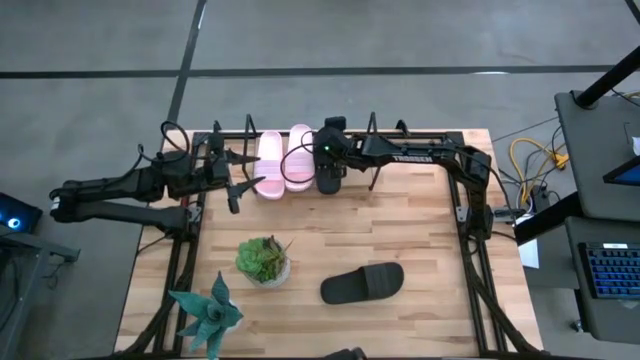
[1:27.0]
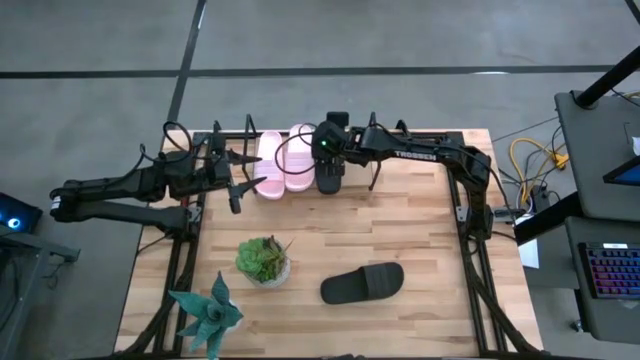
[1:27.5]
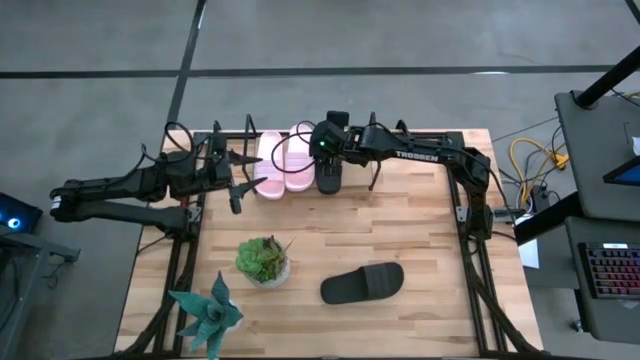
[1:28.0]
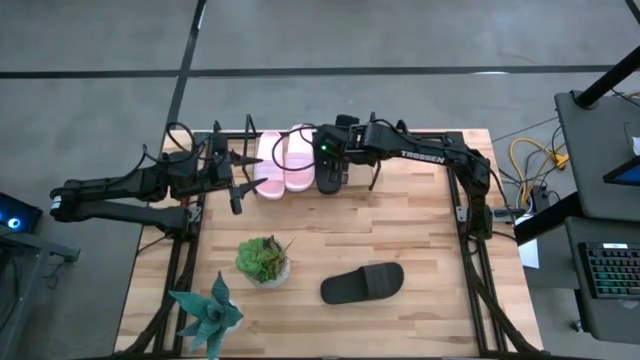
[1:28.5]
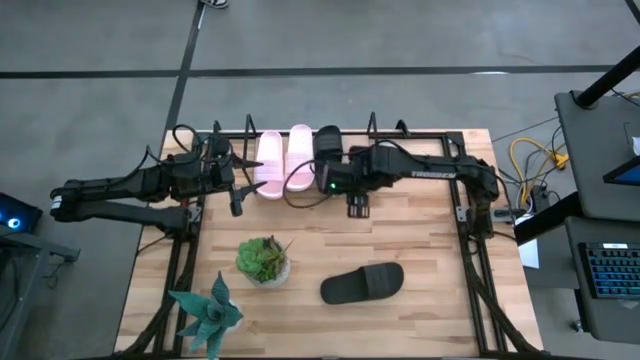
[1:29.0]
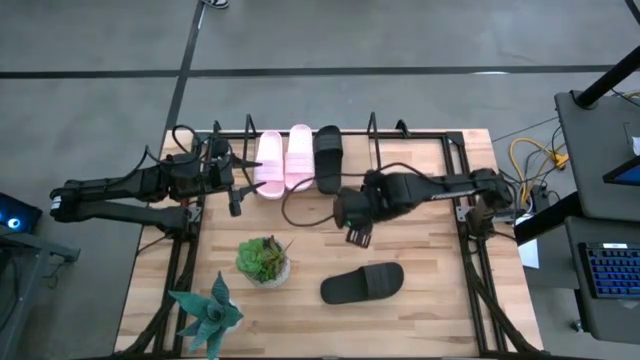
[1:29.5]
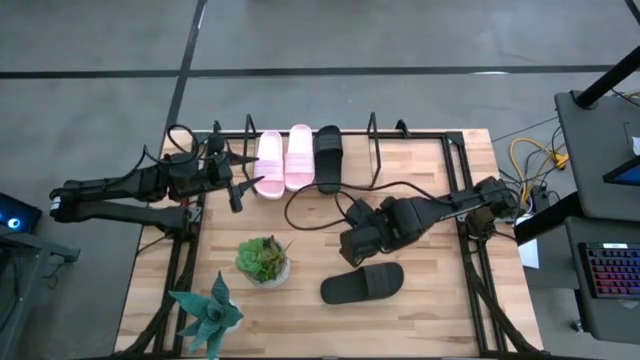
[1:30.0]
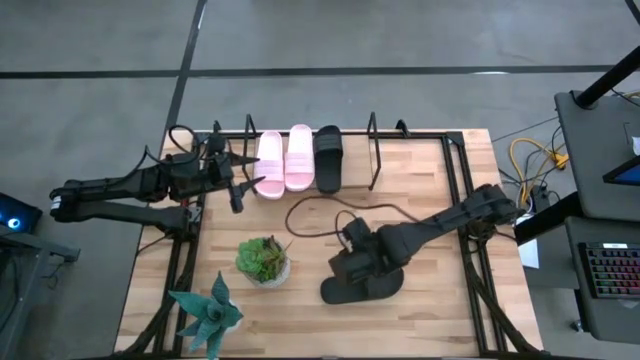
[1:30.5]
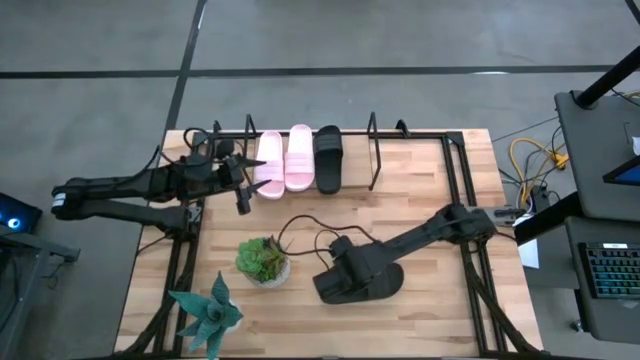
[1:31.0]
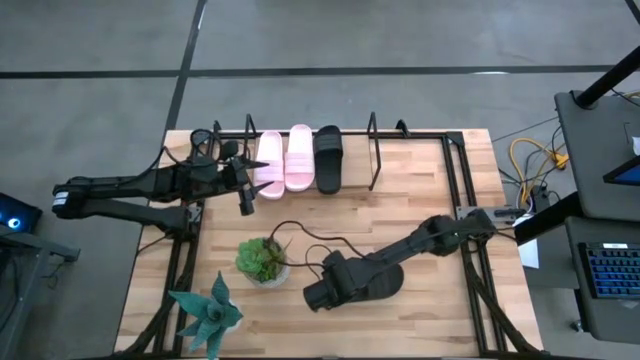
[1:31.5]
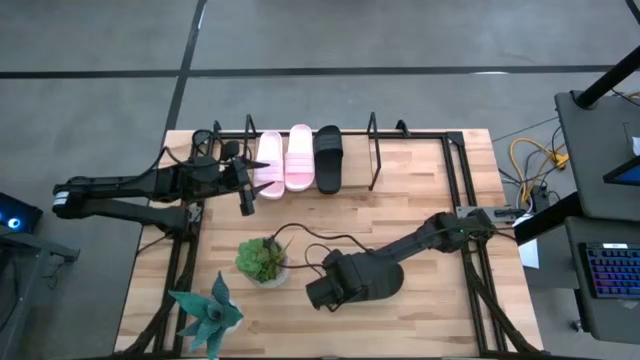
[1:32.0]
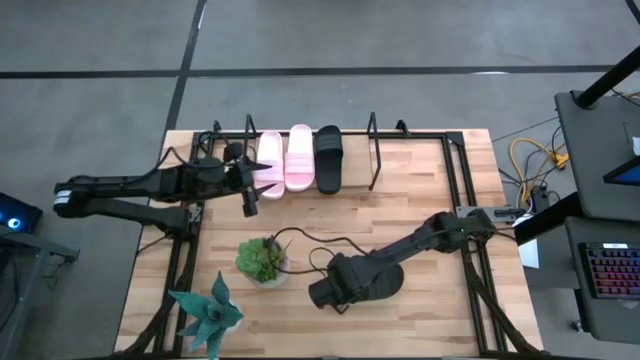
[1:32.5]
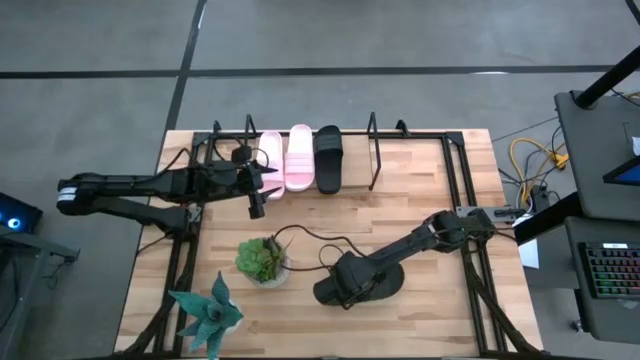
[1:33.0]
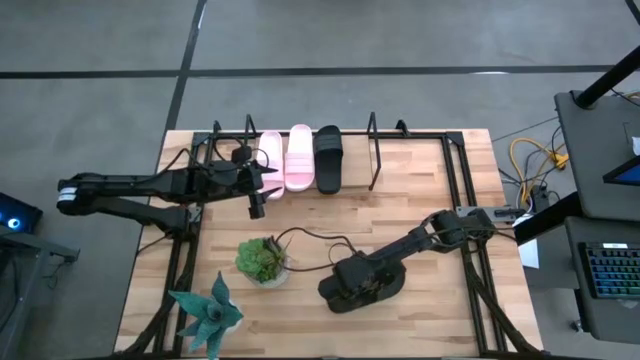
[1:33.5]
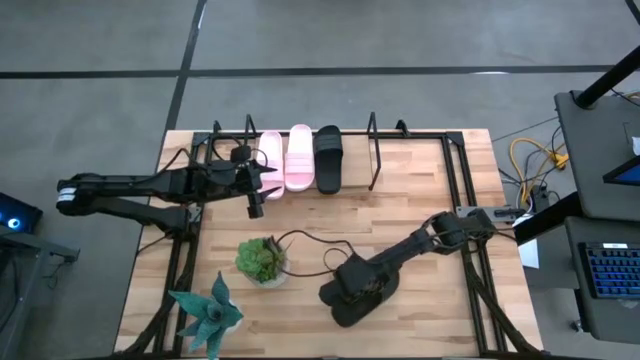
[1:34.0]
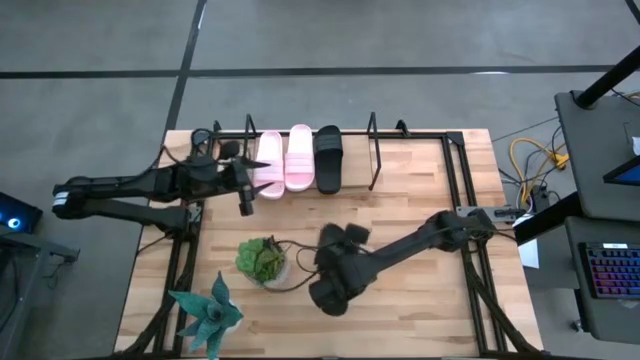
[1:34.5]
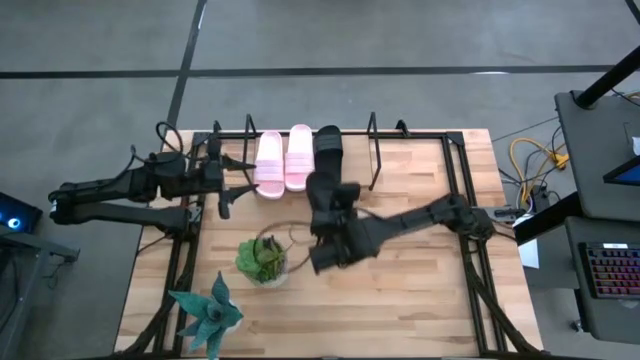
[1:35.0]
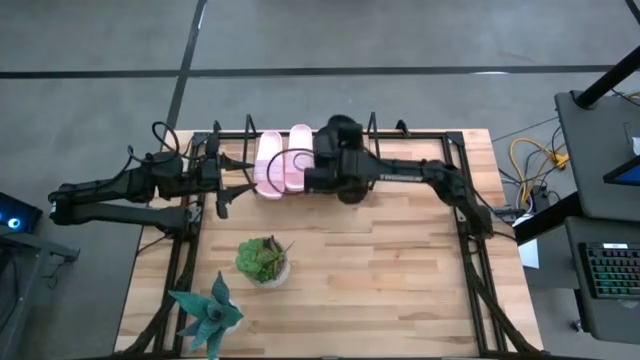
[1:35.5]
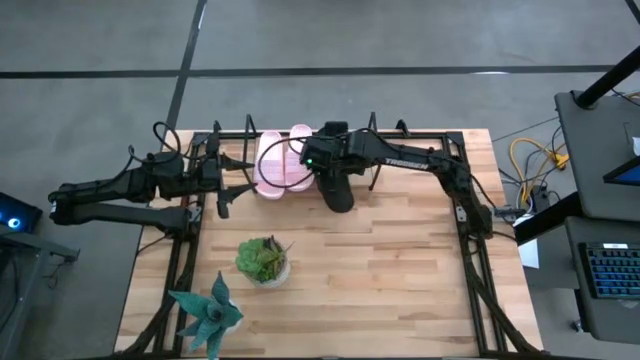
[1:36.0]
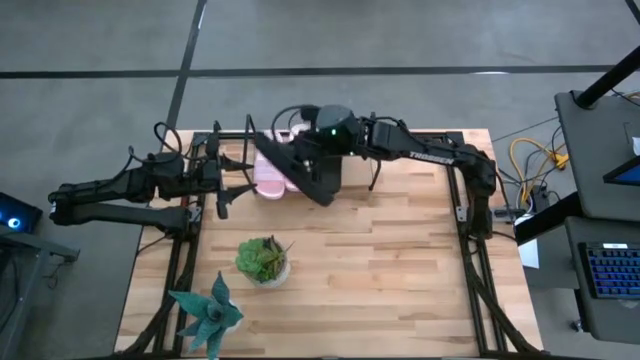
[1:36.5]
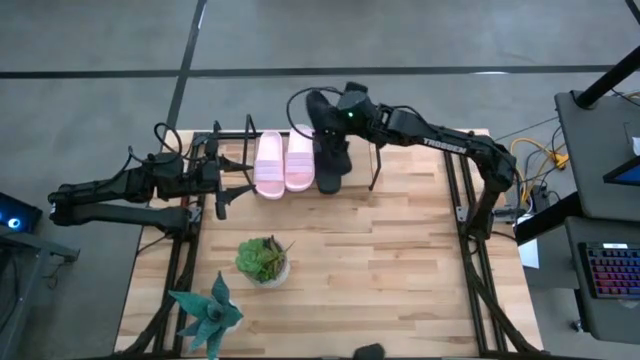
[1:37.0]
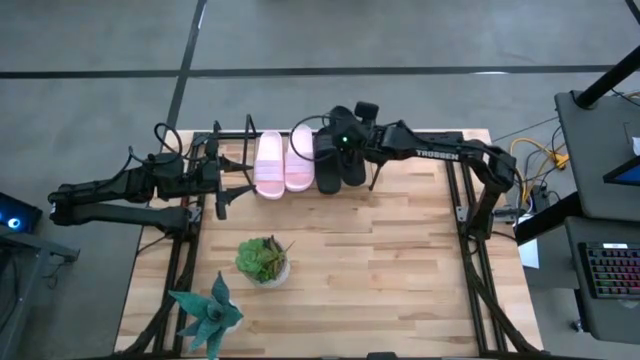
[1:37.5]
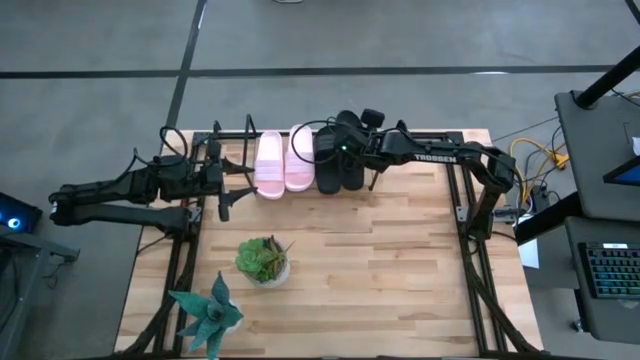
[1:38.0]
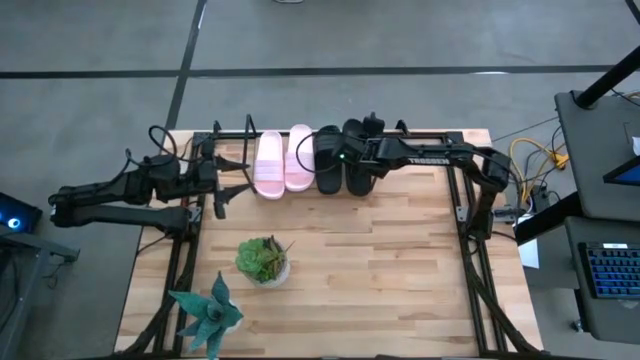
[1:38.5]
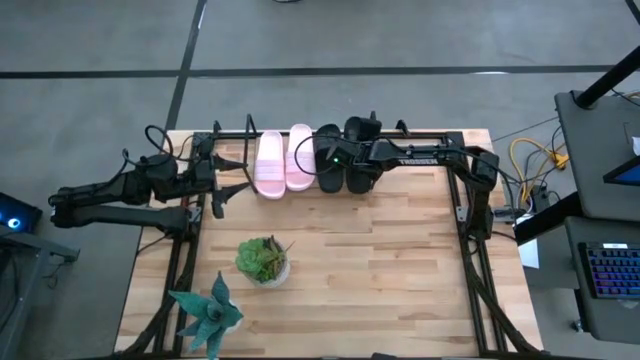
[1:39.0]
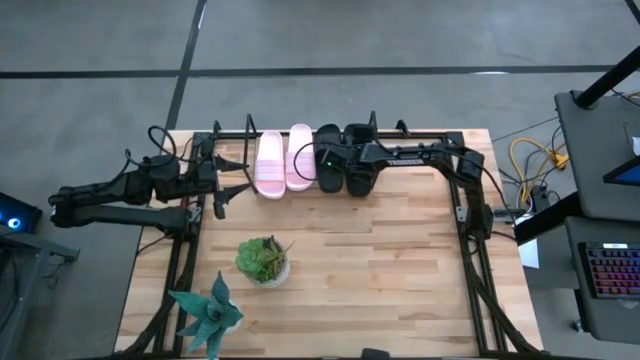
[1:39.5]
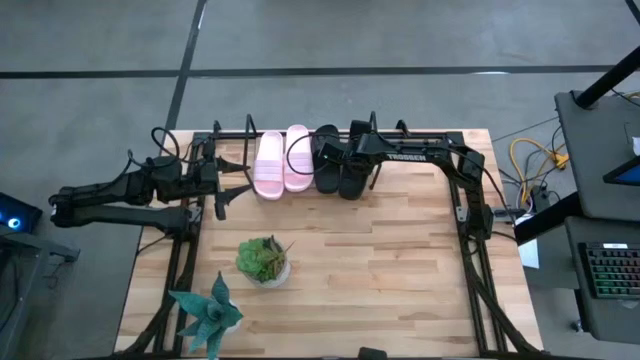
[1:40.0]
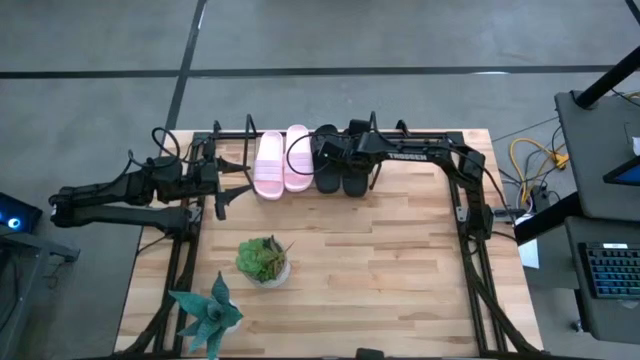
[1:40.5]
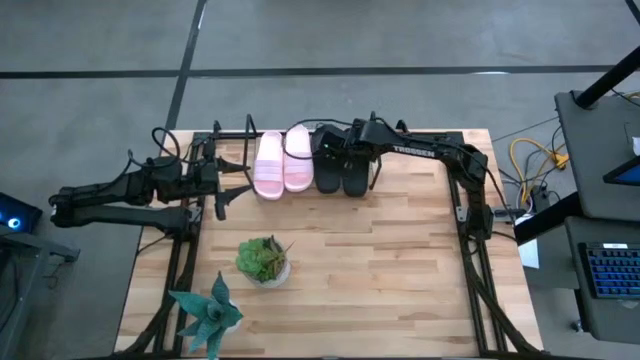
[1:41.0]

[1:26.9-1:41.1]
Task: Pick and place slides into the shelf
Put the bottom black slide on the shelf

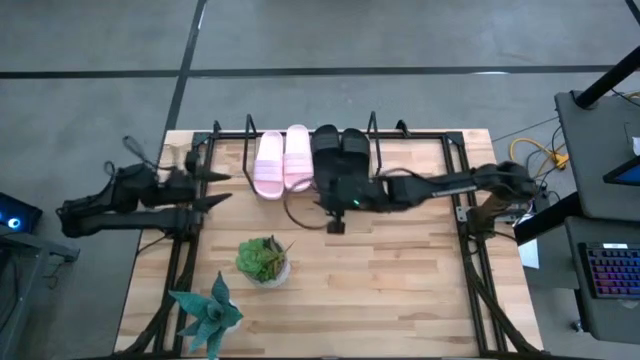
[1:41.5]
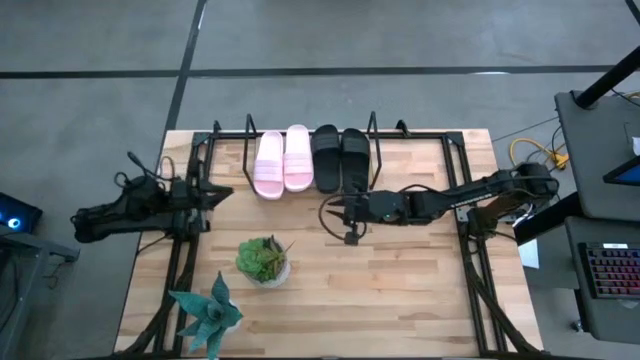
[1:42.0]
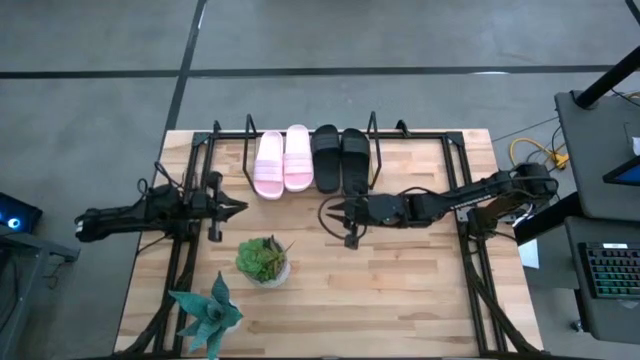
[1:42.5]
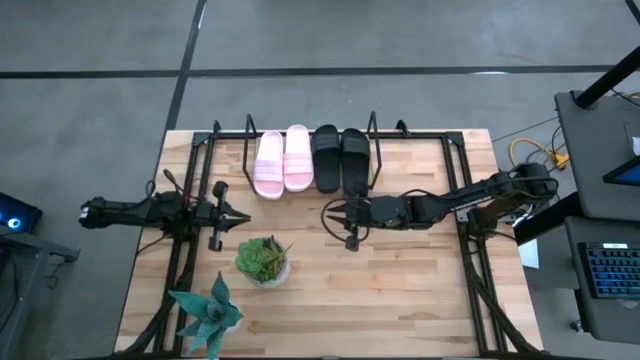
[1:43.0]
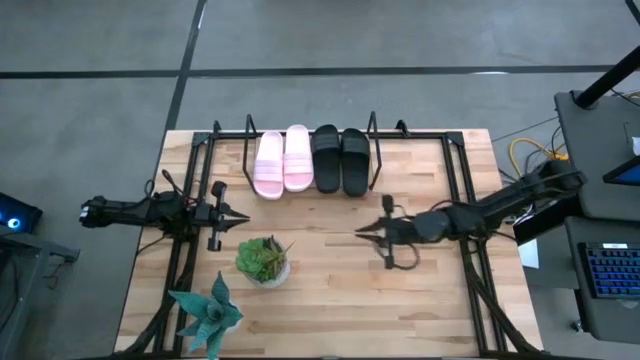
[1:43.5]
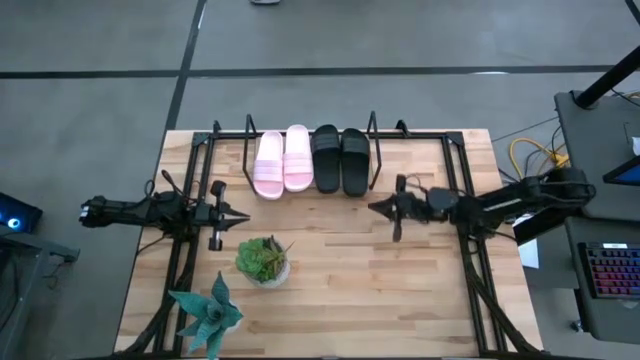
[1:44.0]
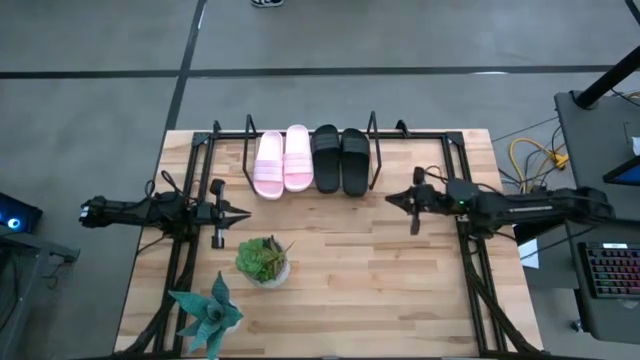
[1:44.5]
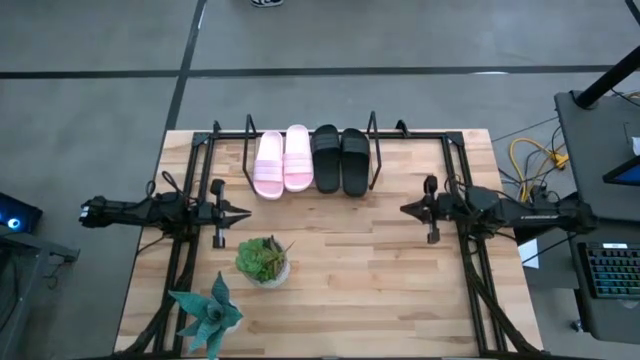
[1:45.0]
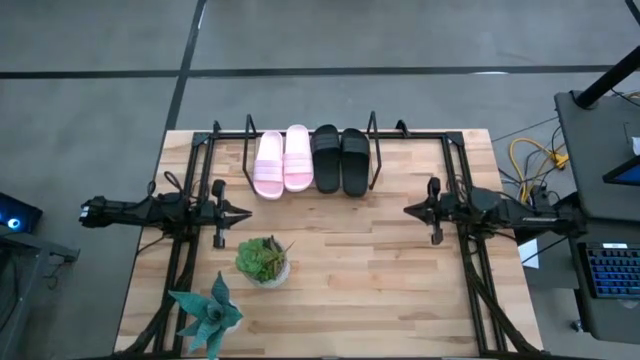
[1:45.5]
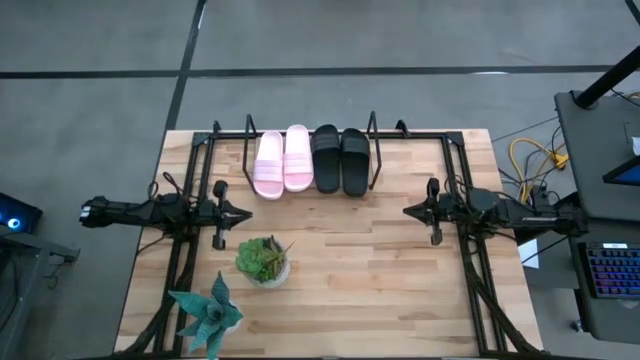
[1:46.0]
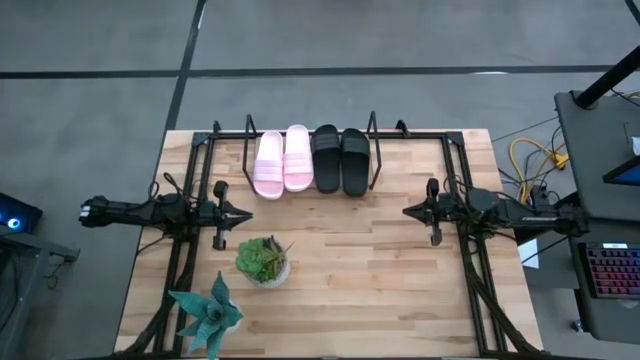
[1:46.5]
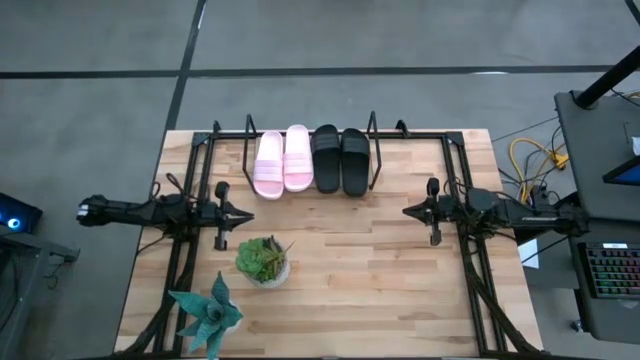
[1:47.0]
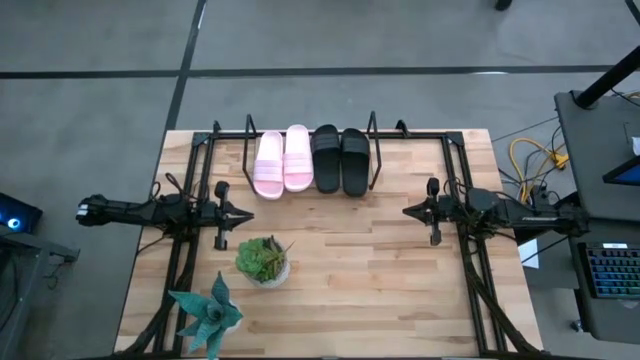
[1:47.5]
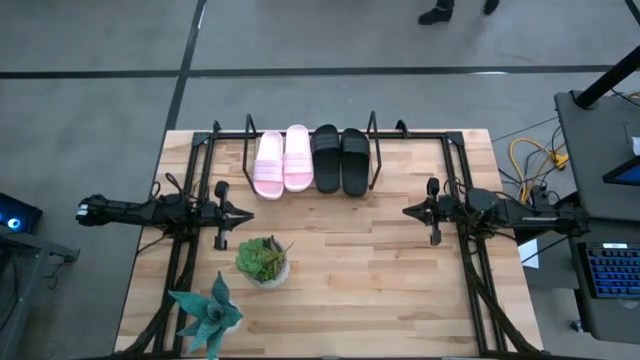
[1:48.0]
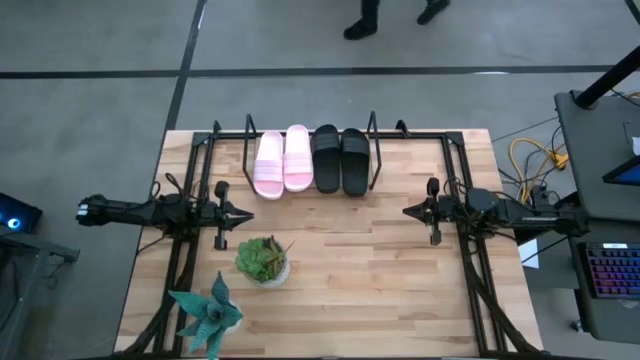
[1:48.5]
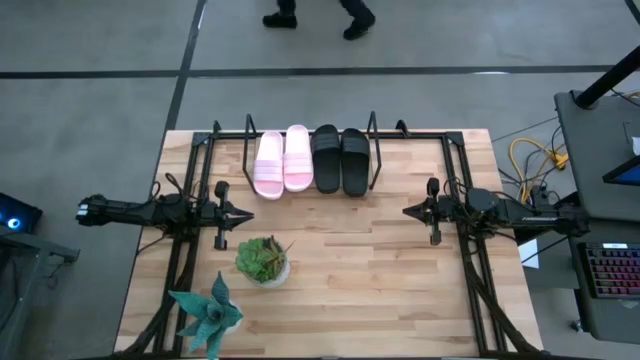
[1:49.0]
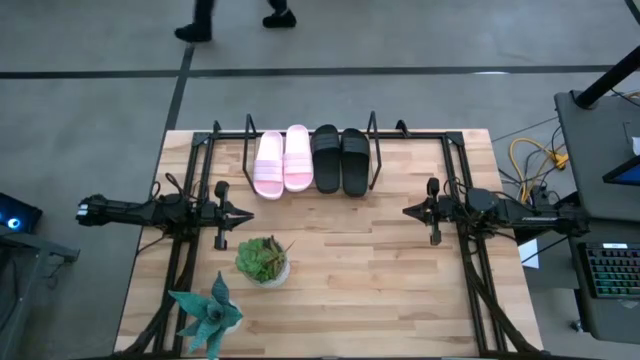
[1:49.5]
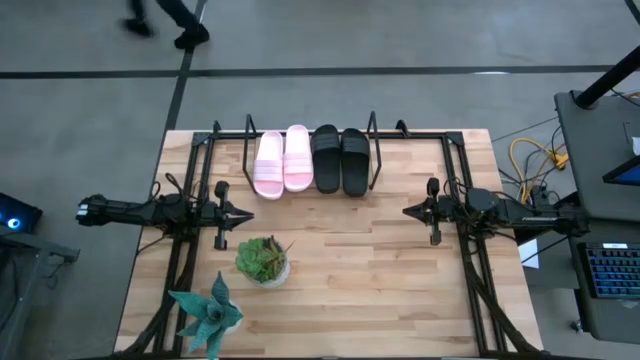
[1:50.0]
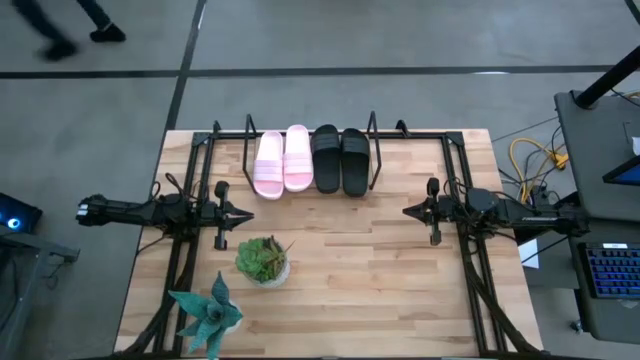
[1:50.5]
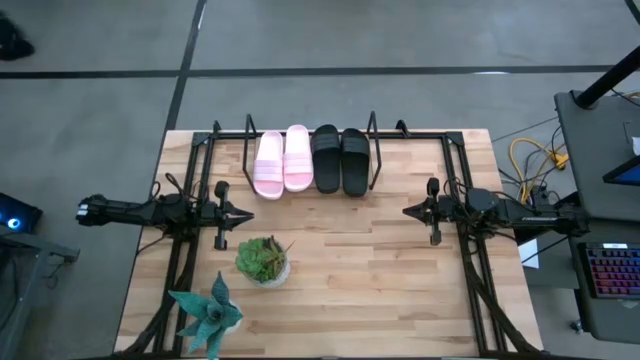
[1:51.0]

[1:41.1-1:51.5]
Return to Home Position
